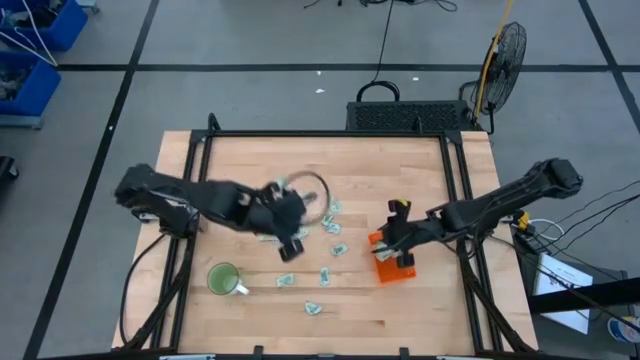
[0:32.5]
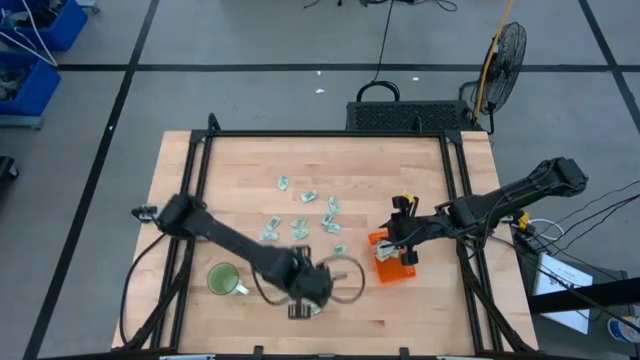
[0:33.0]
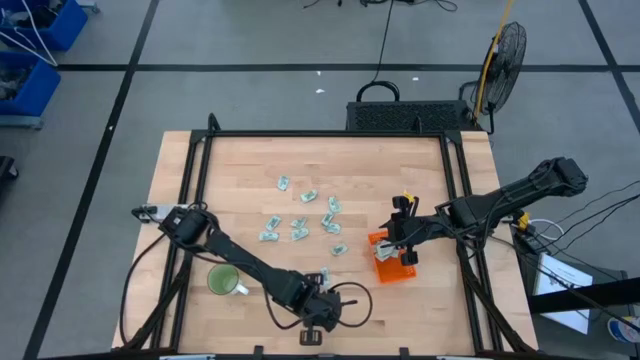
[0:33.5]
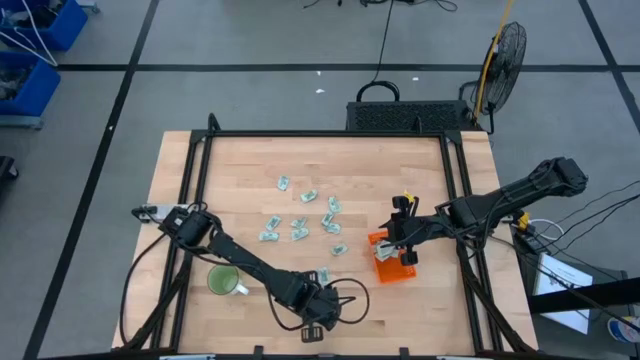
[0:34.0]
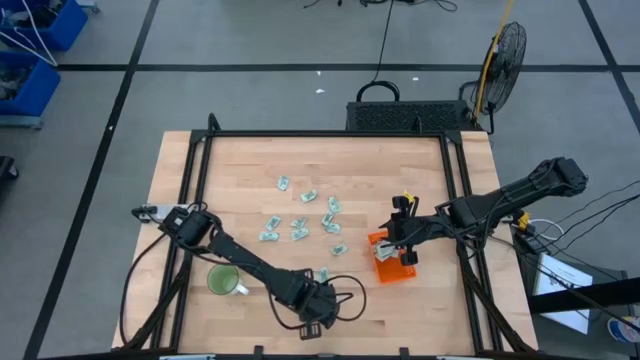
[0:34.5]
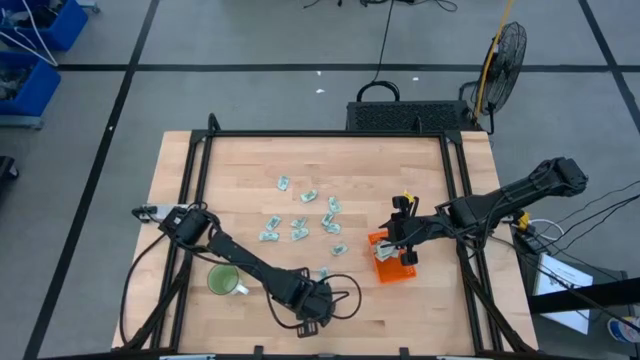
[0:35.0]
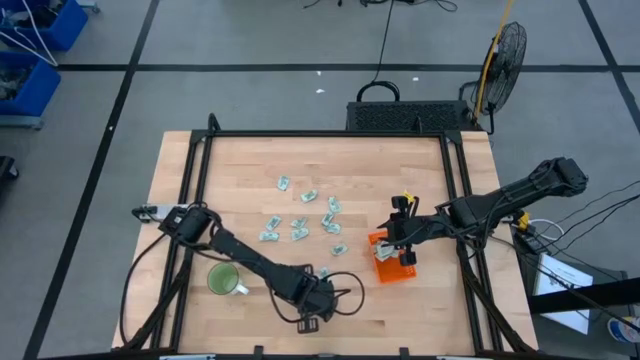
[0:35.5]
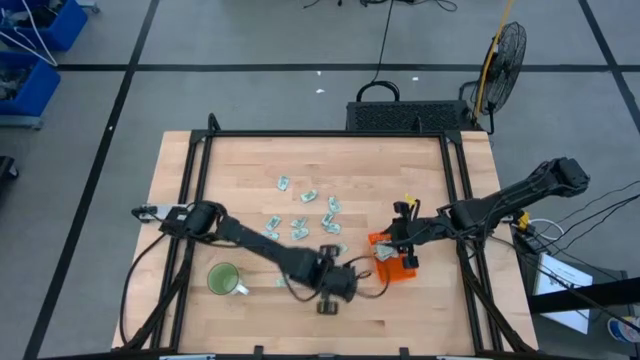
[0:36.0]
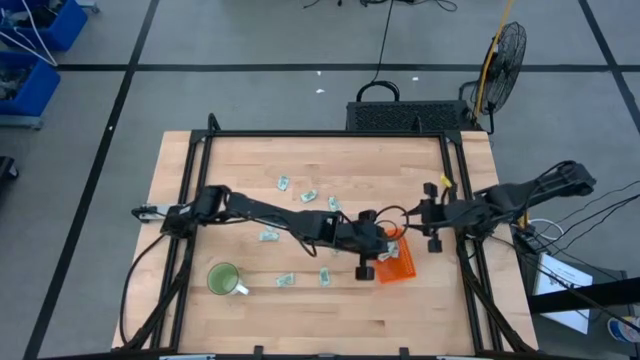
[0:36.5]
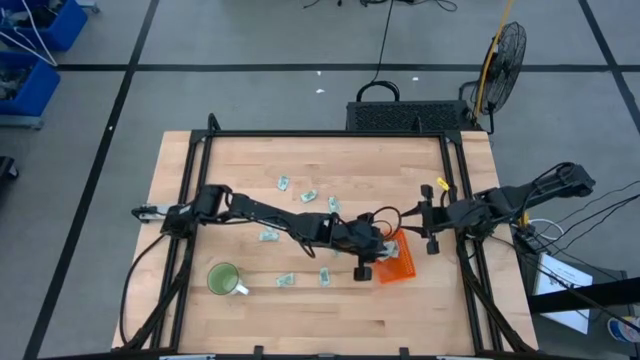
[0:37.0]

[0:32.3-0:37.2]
Task: Pick and place Stevia / Truvia into bins
Put the stevia packet into the orange basket

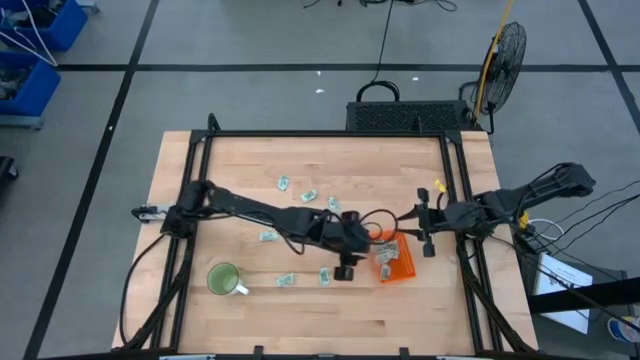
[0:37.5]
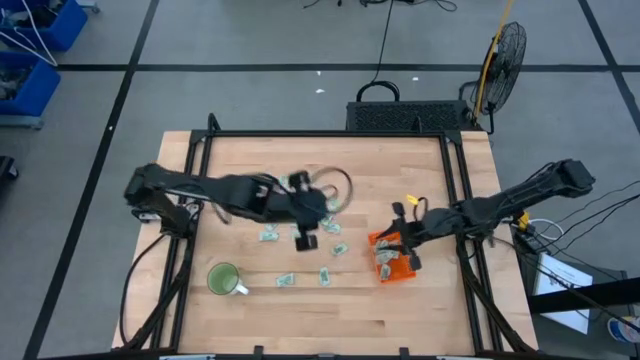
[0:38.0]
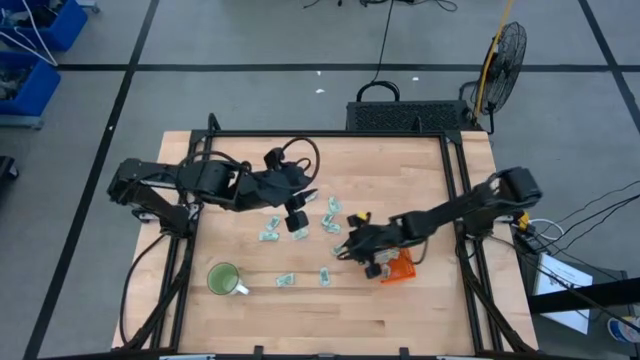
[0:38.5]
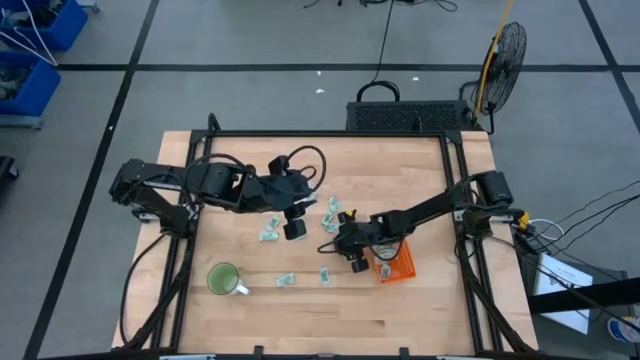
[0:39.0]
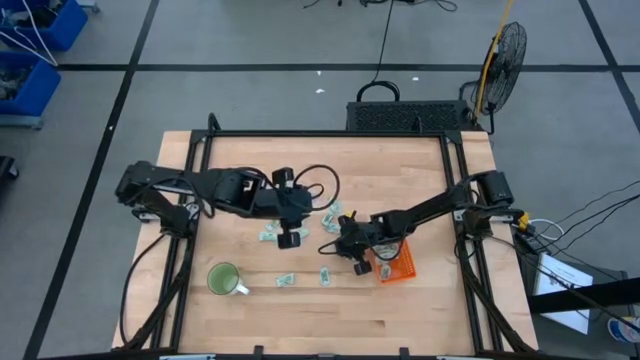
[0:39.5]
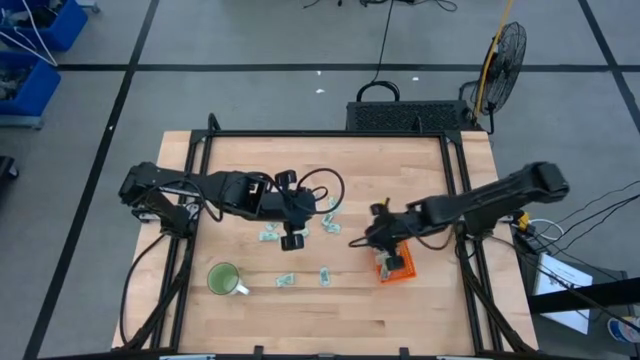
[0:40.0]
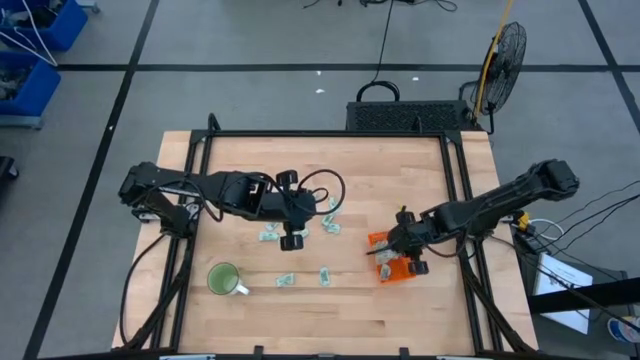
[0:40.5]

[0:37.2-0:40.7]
Put the stevia packet into the orange basket

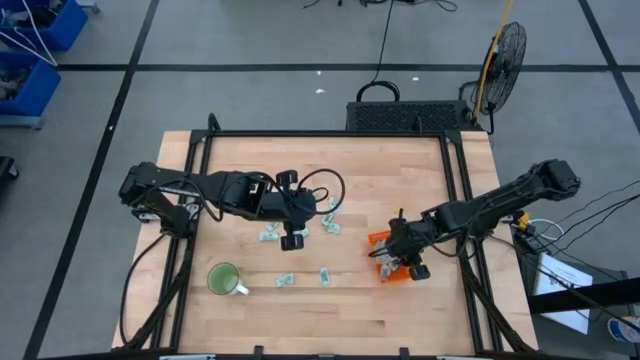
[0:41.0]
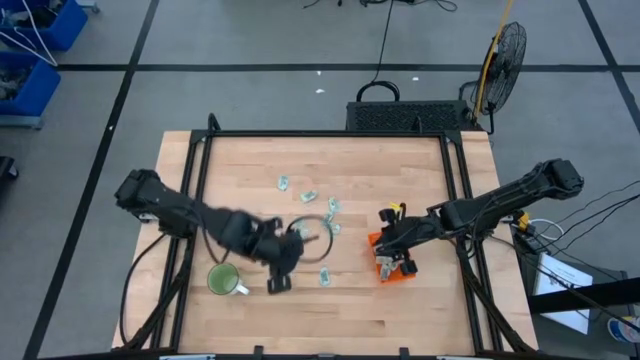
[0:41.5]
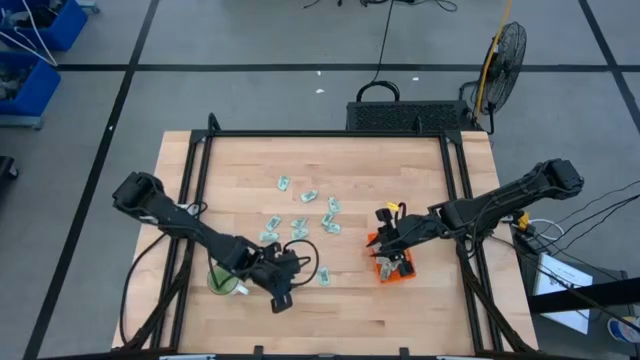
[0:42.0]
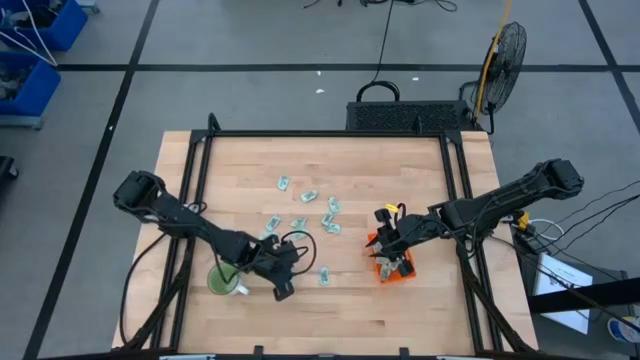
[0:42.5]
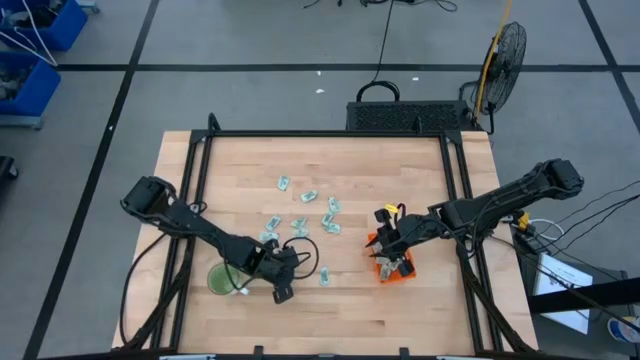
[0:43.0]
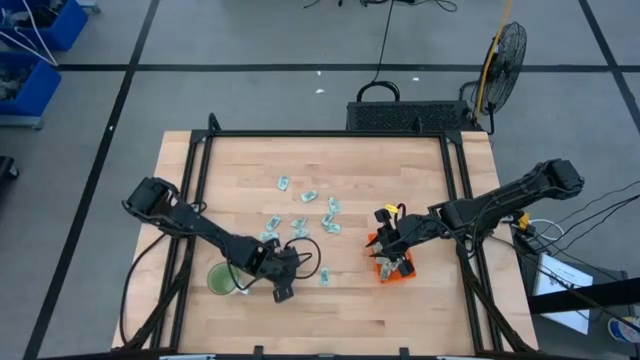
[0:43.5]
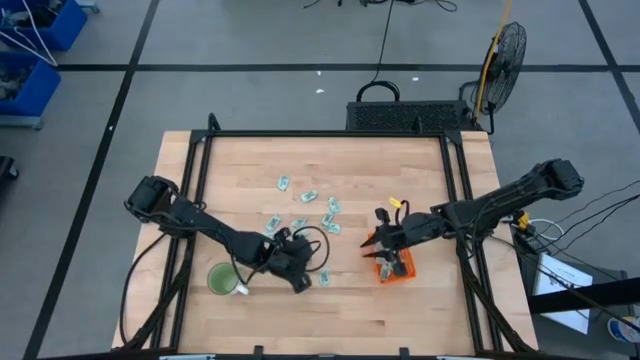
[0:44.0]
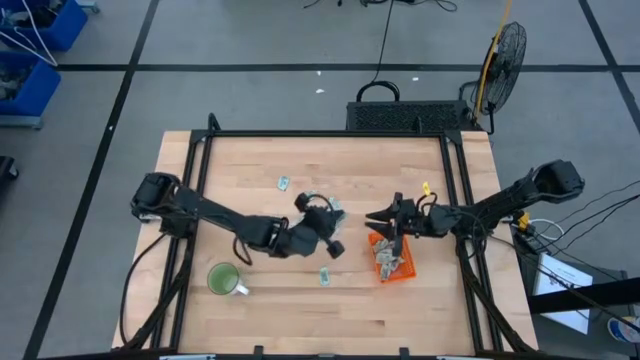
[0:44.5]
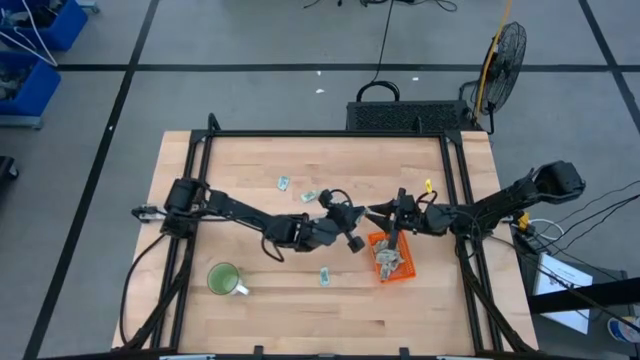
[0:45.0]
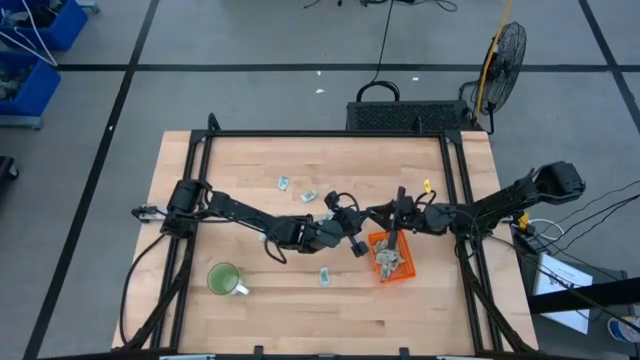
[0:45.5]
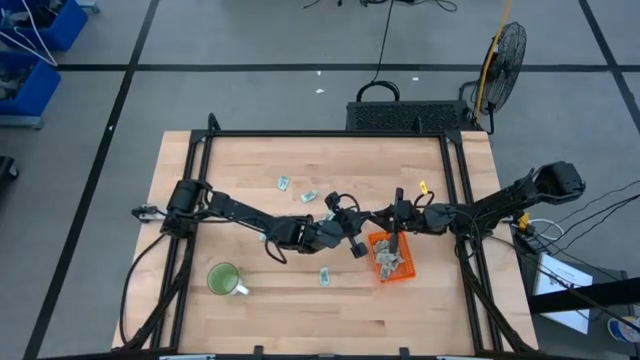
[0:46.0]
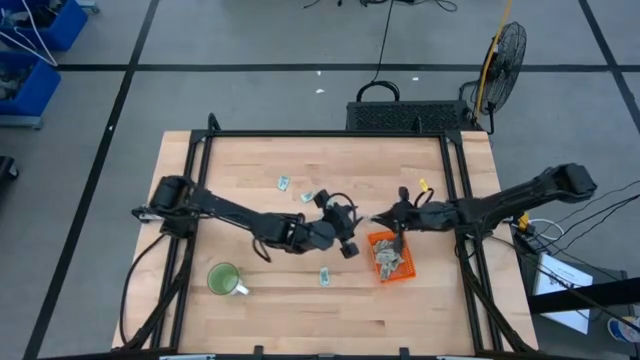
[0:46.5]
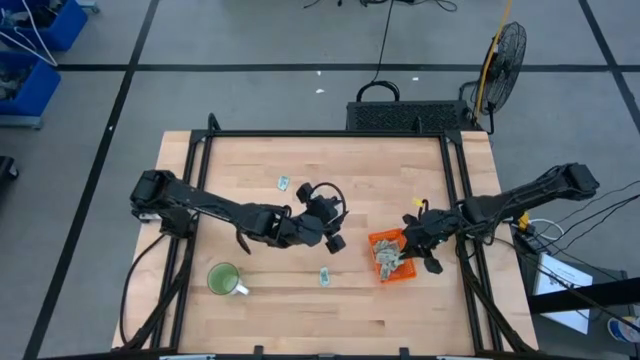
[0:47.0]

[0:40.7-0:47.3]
Put the stevia packet into the orange basket

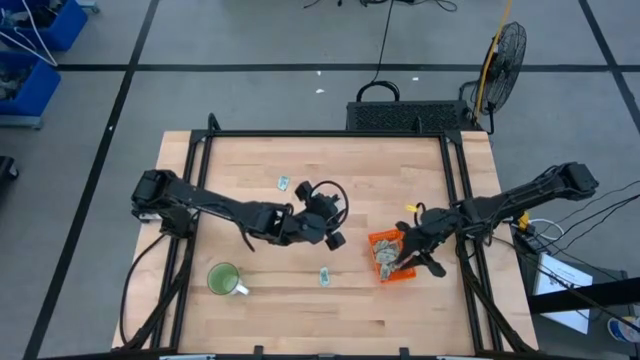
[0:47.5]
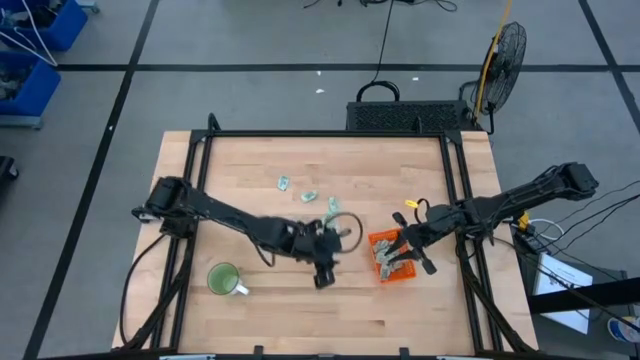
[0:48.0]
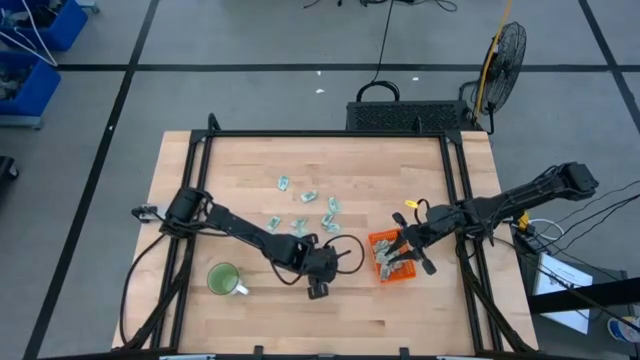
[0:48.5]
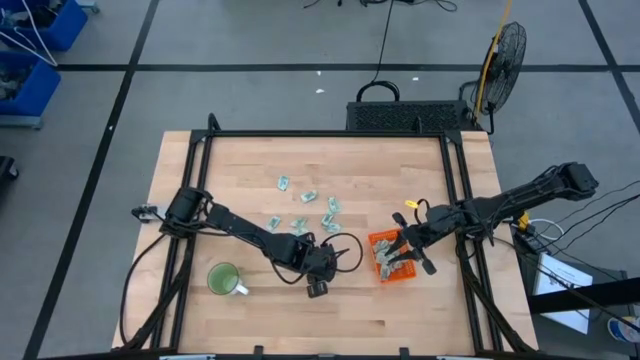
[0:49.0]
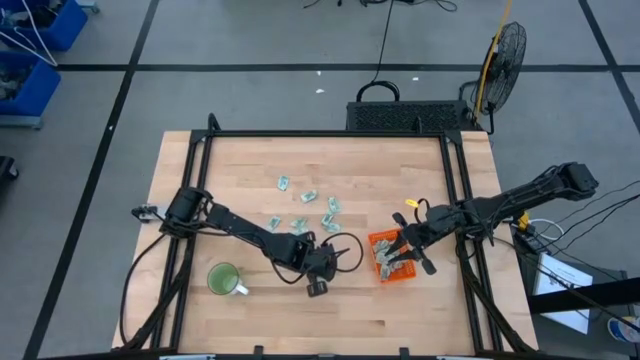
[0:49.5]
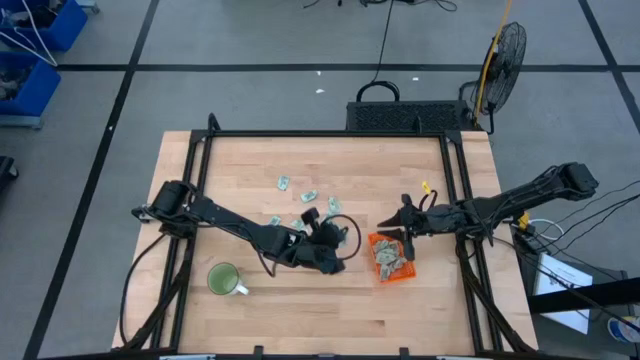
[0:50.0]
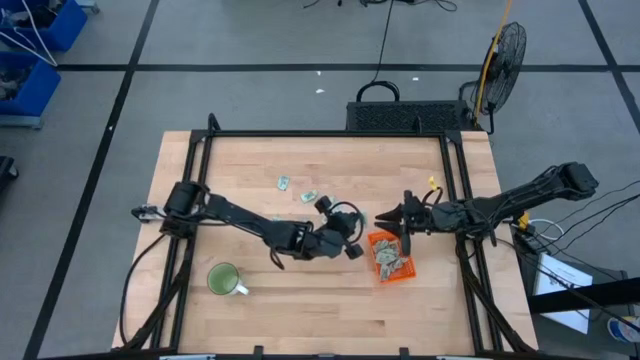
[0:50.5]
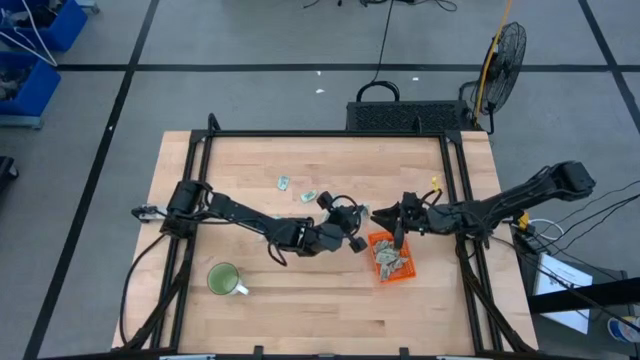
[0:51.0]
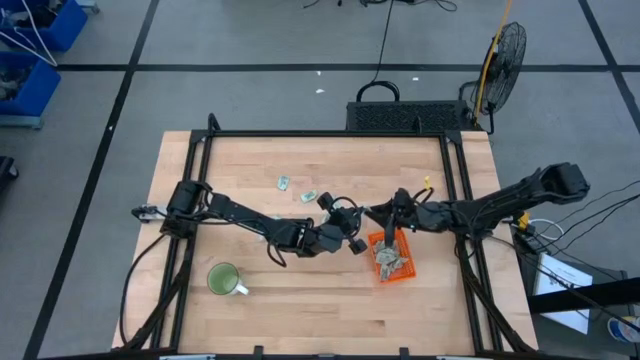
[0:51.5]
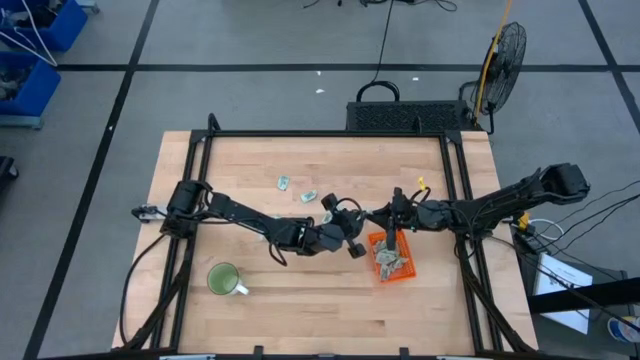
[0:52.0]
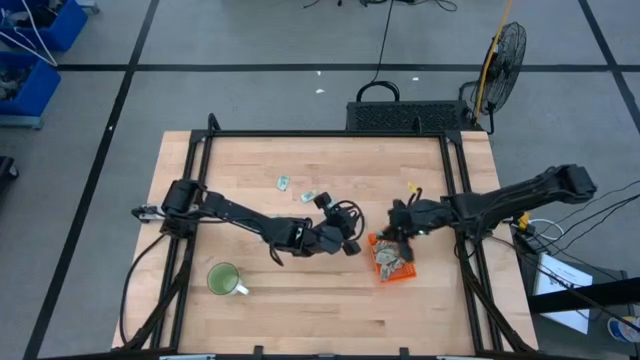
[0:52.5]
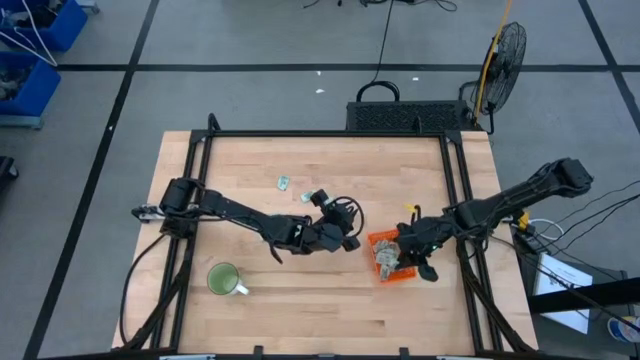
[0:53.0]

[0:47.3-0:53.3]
Put the stevia packet into the orange basket

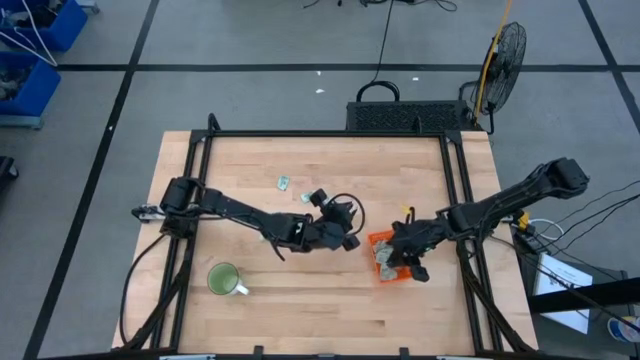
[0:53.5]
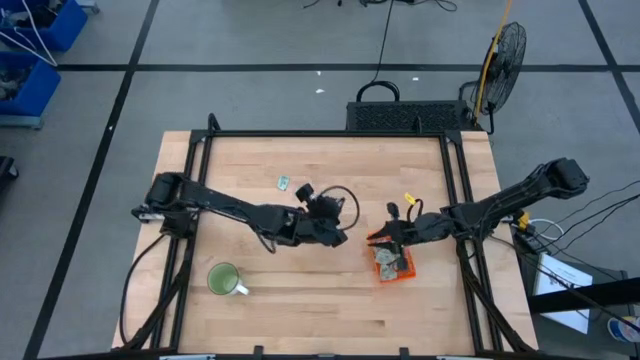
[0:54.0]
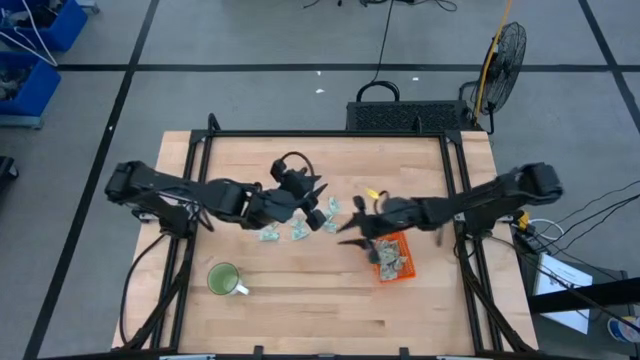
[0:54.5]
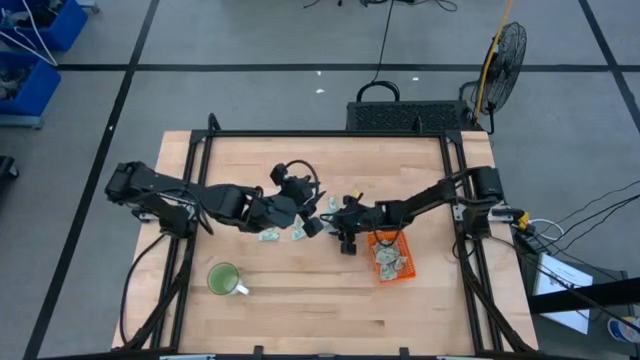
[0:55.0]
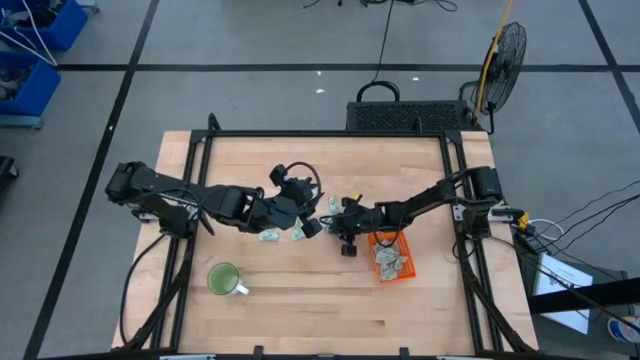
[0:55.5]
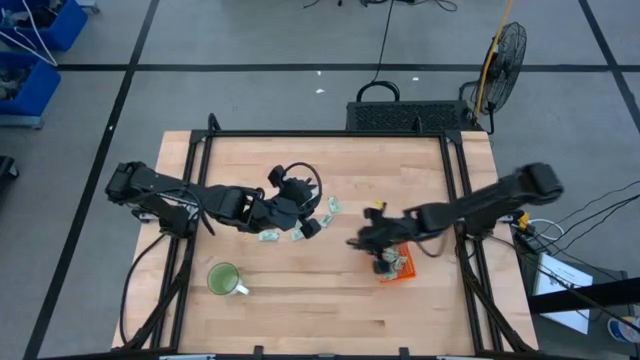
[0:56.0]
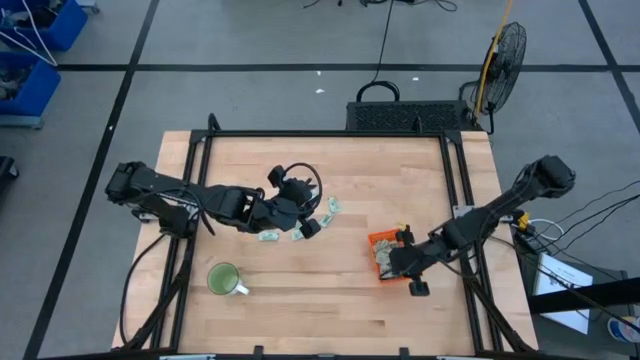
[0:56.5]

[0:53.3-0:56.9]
Put the stevia packet into the orange basket
